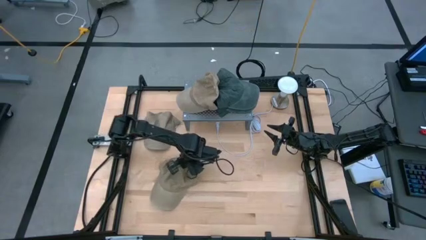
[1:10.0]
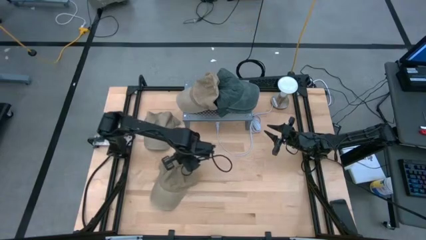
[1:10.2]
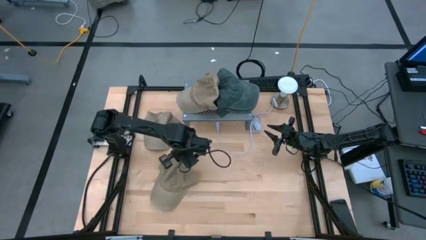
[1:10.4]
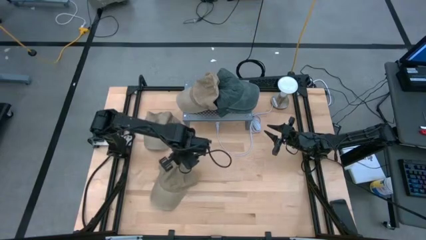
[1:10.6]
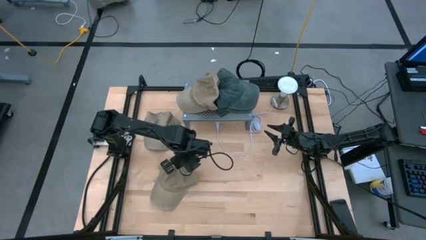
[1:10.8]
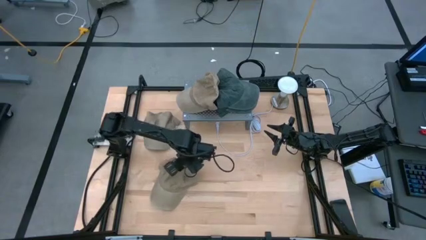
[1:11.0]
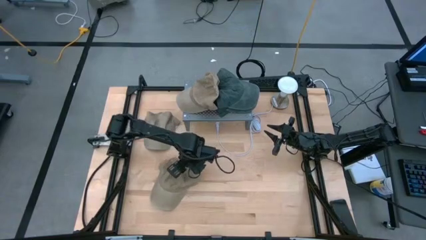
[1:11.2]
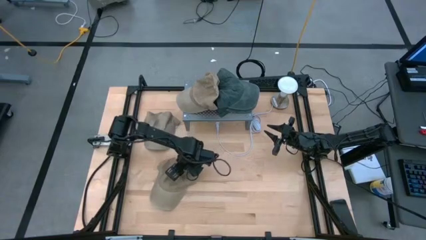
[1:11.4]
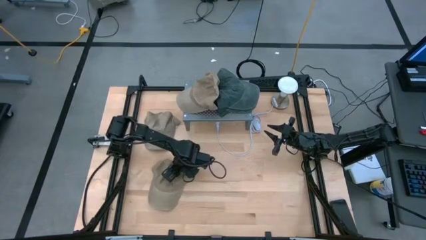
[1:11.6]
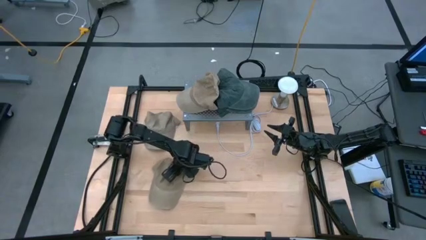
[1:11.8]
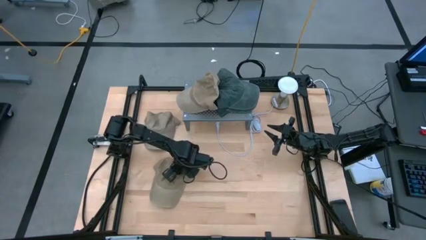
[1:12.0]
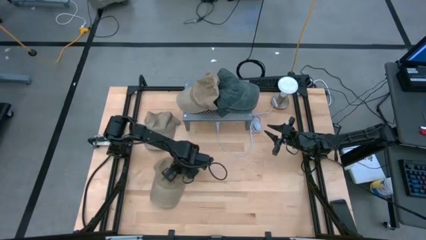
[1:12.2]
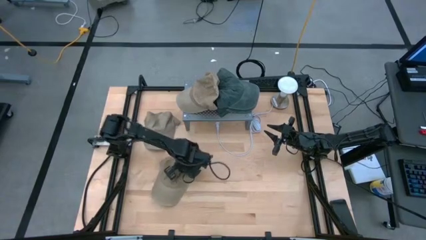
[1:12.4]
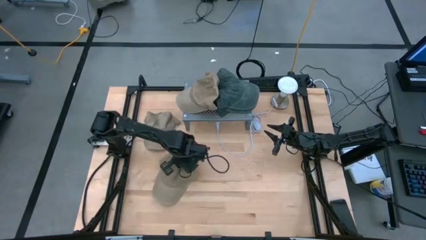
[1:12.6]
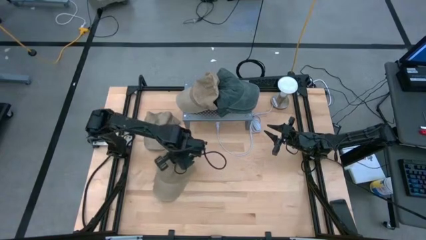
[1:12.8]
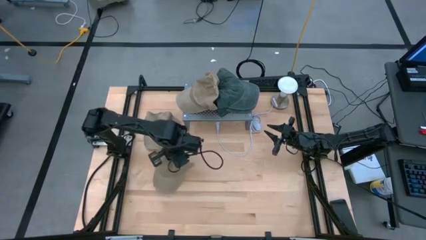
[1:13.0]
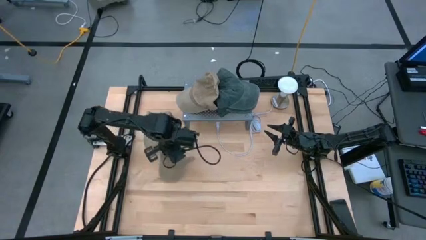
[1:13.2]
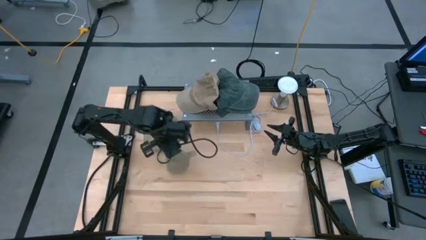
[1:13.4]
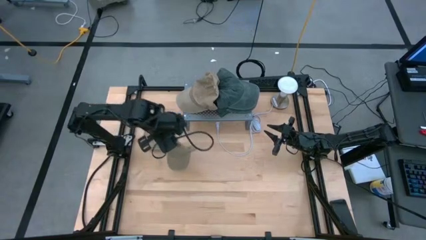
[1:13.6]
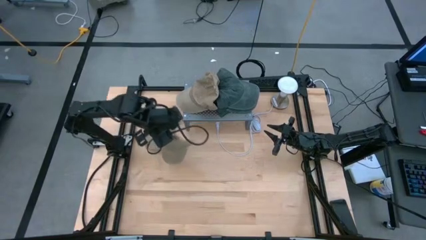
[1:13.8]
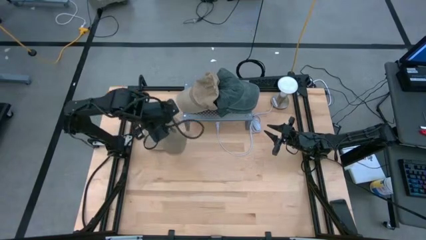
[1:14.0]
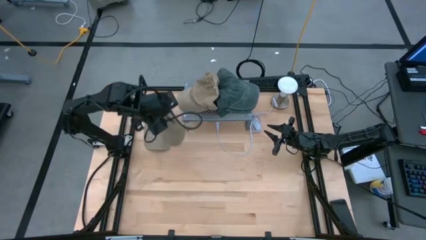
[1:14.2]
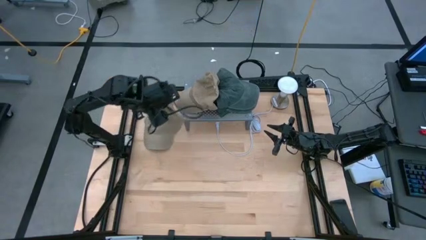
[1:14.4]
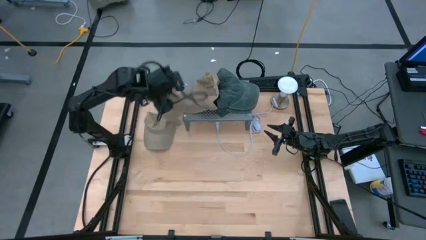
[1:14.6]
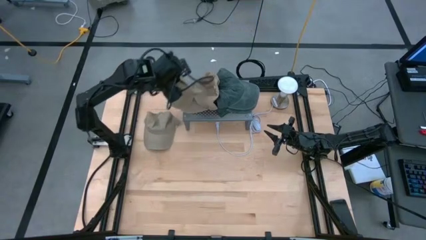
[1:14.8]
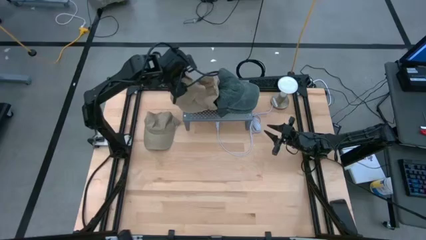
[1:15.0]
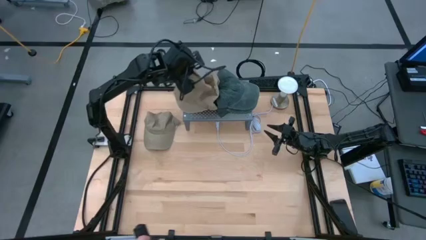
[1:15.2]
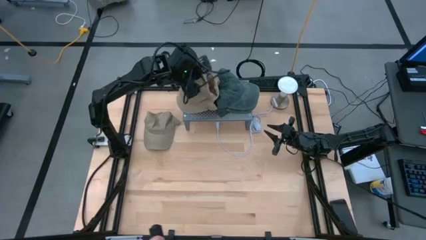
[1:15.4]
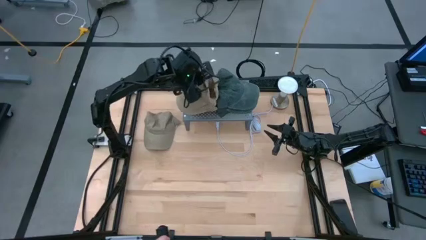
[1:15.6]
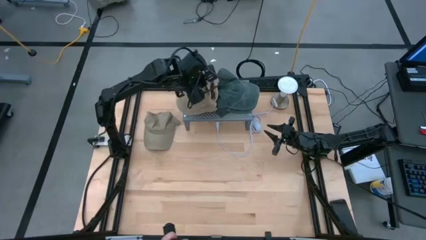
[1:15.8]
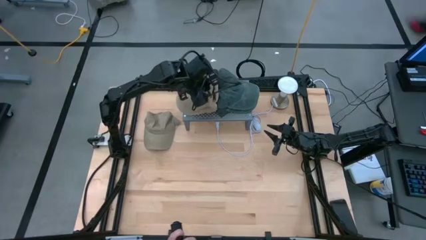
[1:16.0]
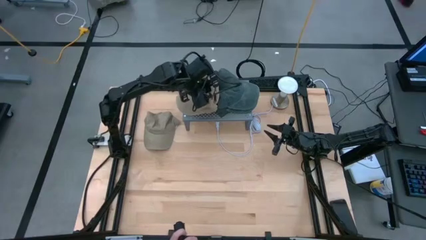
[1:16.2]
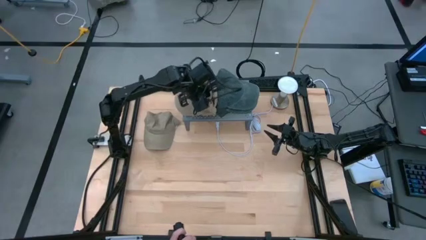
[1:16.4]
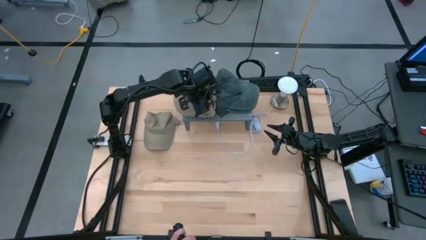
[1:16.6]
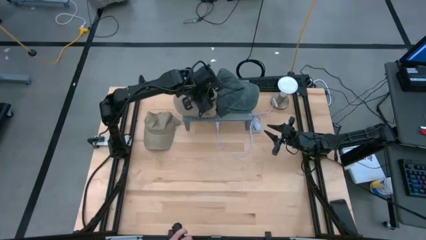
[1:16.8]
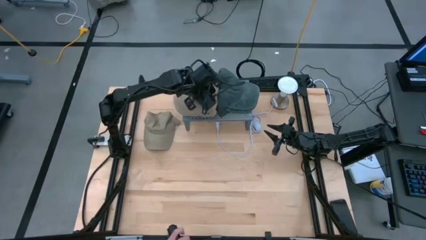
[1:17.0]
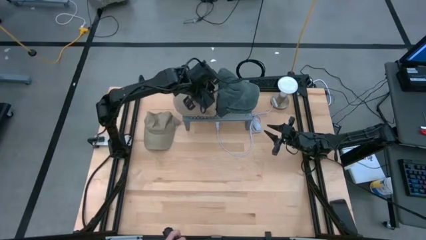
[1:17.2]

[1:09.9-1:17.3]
Task: Pick & Place hat
Stack the bottom brown cap on top of the brown cap on the shelf

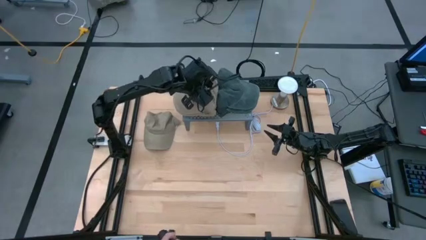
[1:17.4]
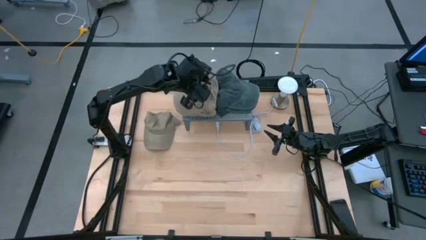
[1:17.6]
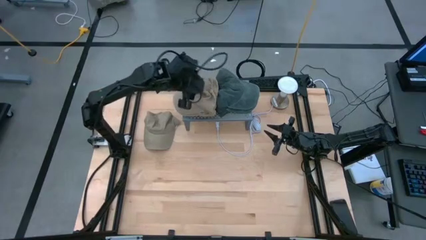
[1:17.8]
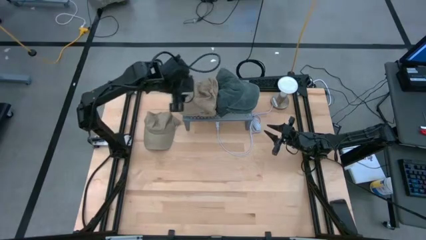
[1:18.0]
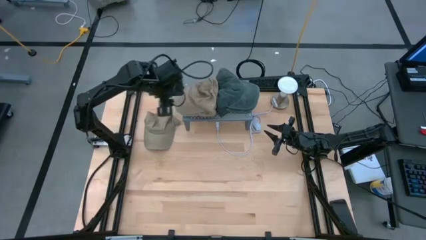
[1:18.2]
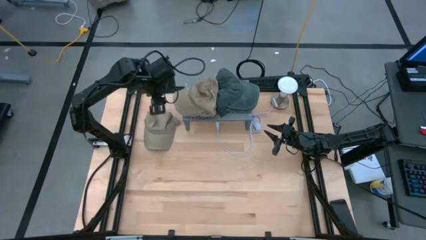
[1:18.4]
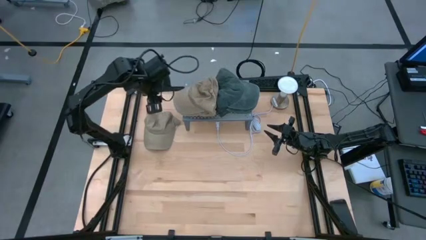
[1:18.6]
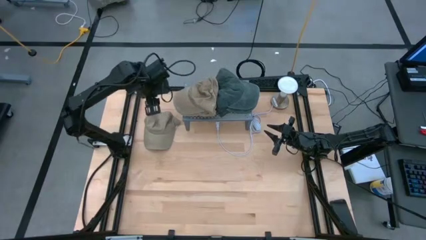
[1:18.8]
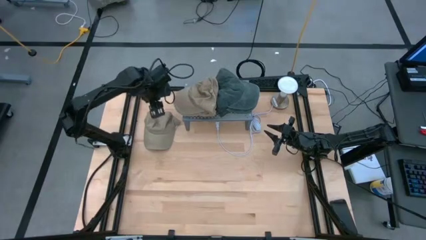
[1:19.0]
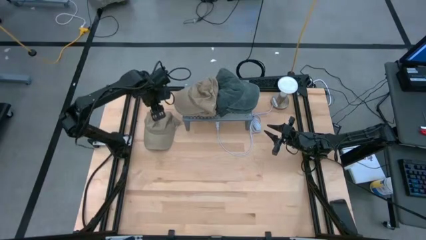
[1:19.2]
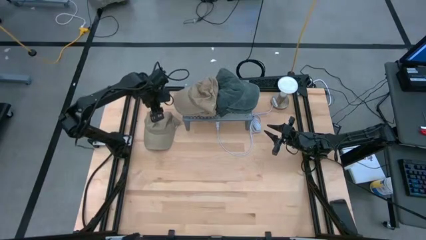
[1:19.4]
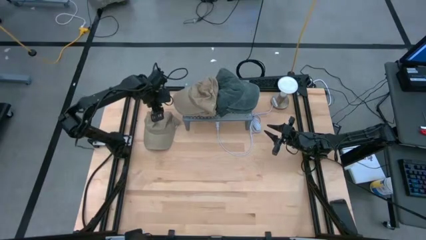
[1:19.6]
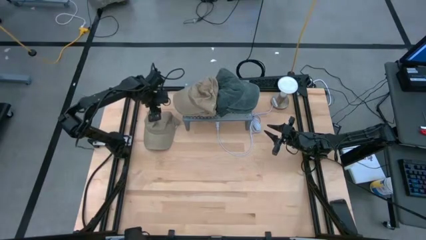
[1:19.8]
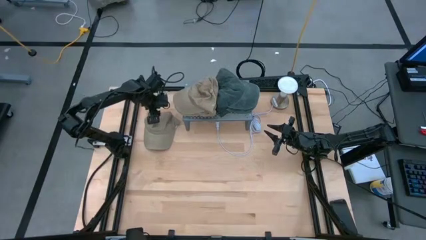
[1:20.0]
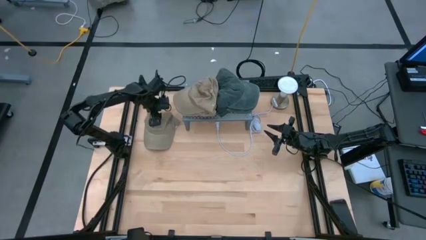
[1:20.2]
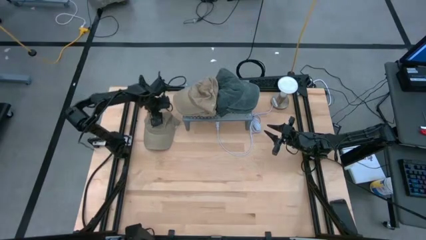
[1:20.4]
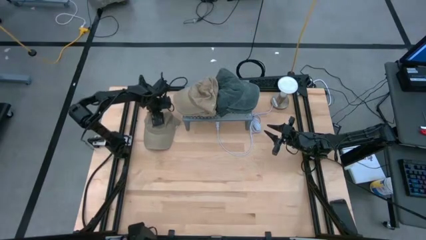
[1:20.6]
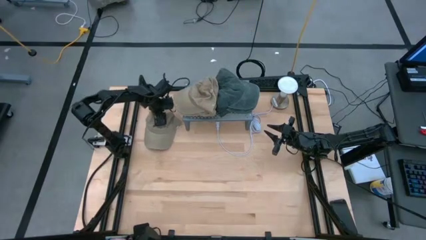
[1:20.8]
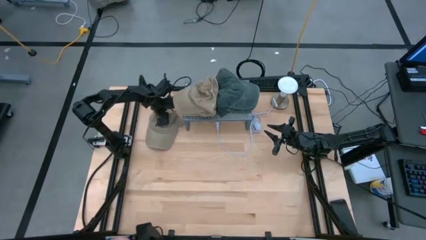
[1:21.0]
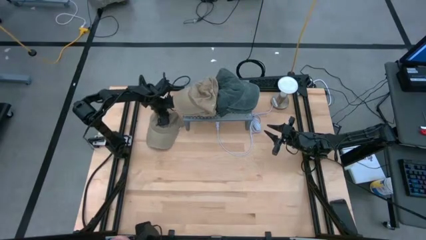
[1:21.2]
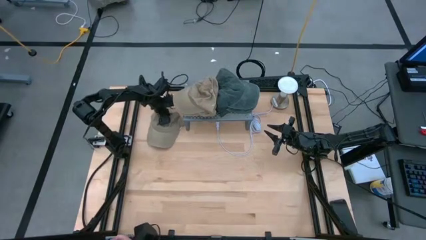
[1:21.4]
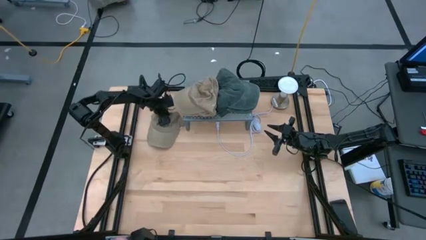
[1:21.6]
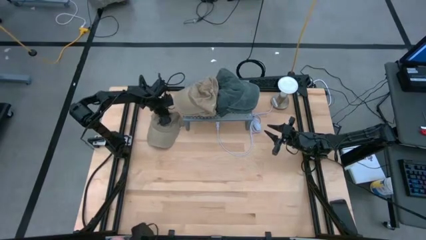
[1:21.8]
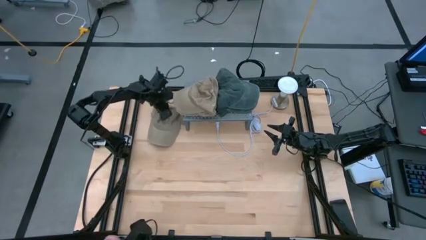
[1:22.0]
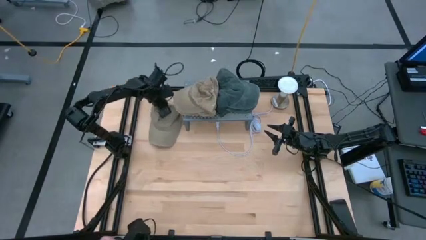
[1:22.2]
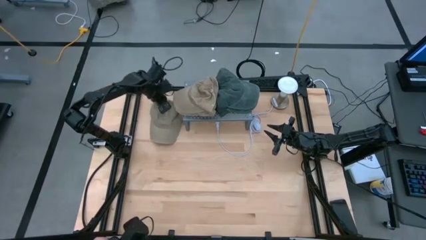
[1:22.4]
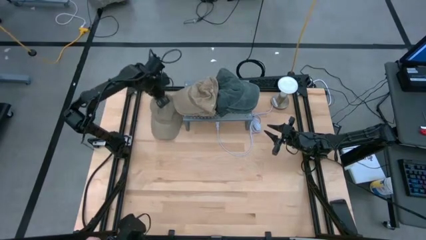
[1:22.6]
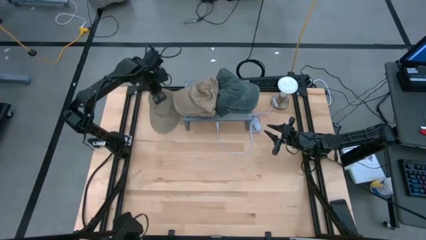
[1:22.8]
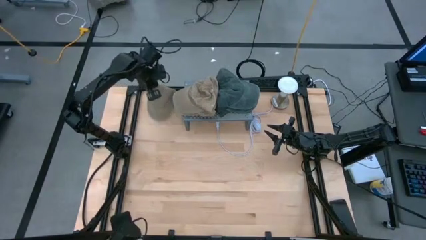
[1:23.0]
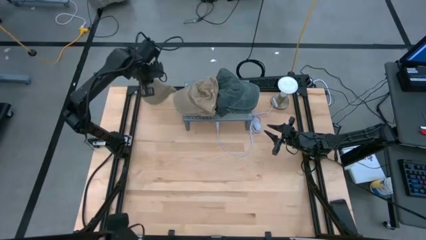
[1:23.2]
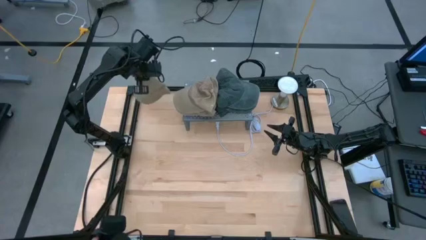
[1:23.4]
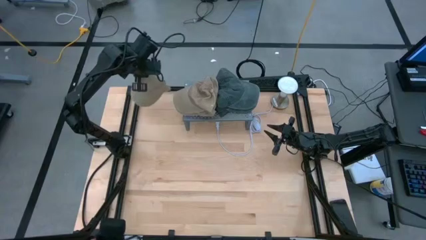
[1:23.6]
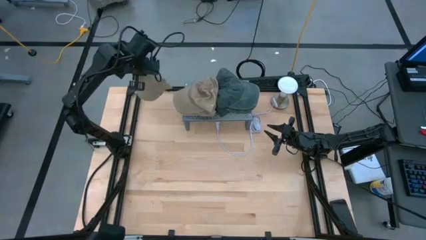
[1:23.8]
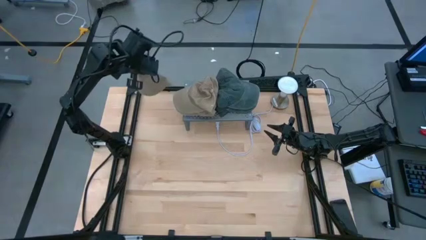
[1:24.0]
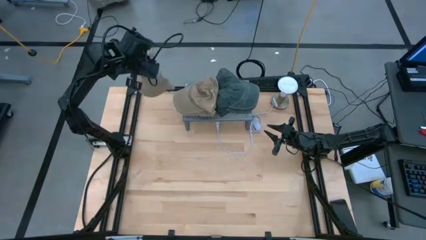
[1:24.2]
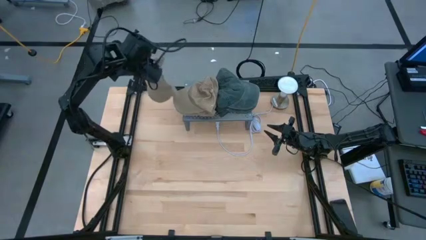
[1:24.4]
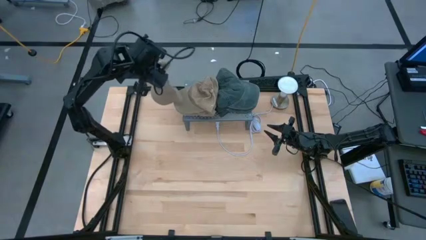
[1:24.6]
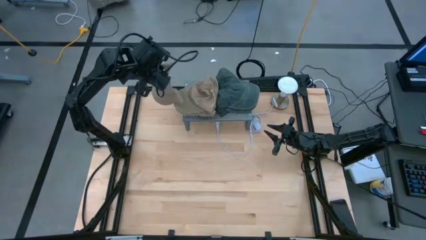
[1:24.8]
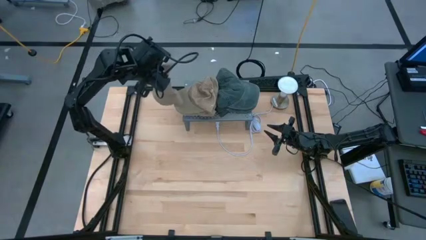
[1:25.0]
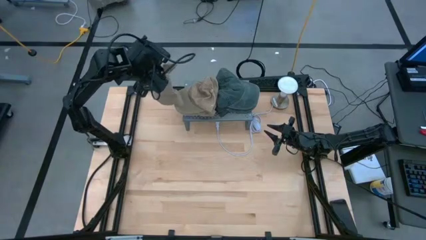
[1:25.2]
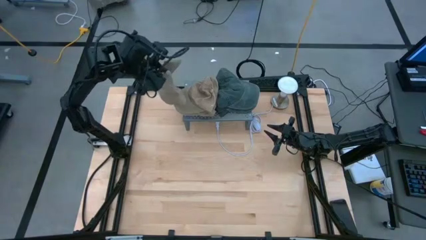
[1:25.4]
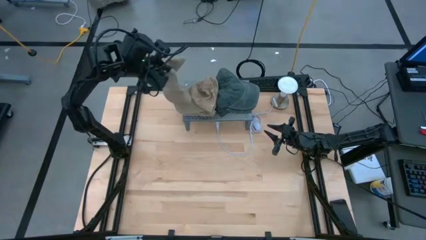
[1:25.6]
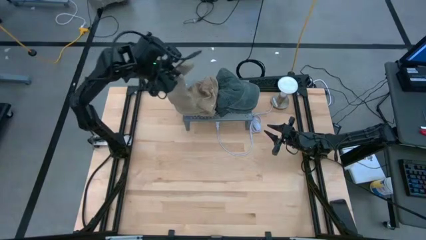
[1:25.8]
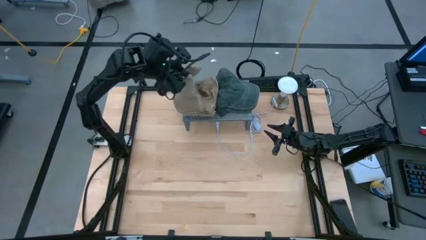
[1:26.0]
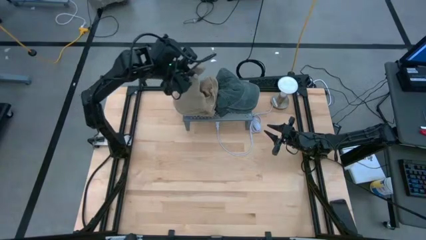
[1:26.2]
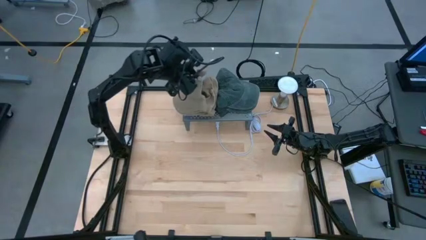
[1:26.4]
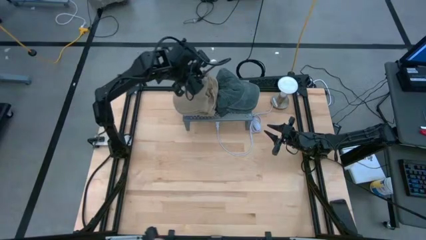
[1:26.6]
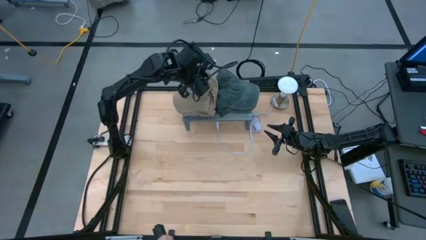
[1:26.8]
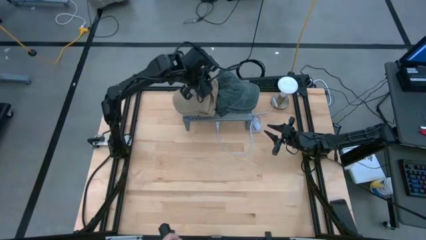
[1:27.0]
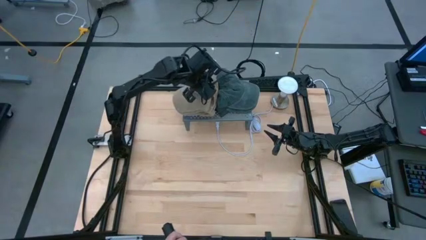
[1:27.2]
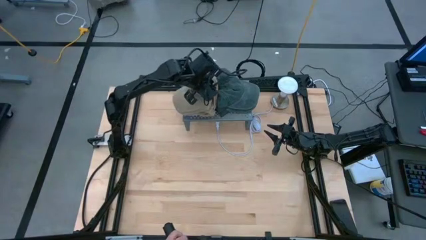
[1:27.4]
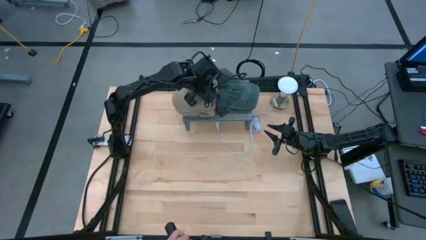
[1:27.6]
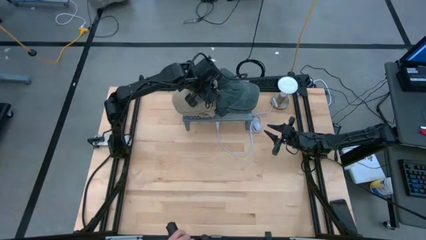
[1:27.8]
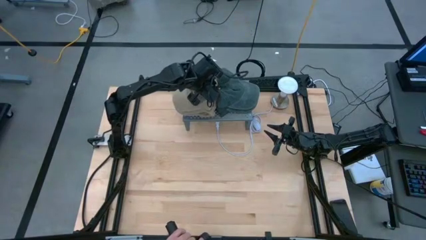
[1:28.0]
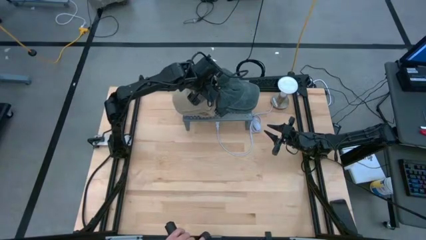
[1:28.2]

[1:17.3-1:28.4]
Stack the bottom brown cap on top of the brown caps on the shelf
